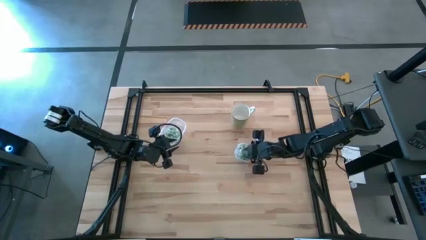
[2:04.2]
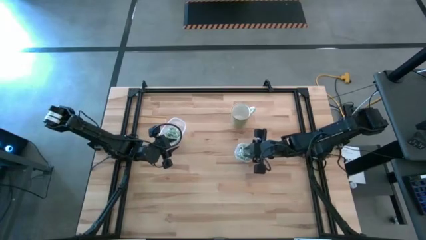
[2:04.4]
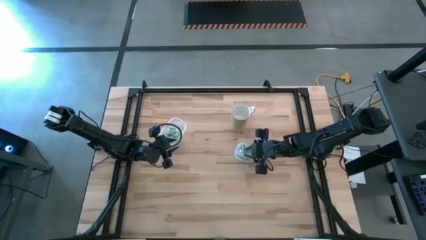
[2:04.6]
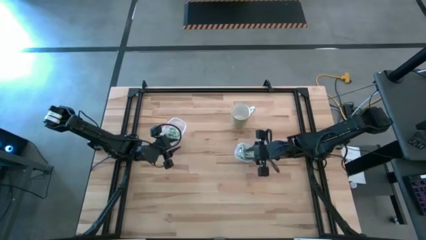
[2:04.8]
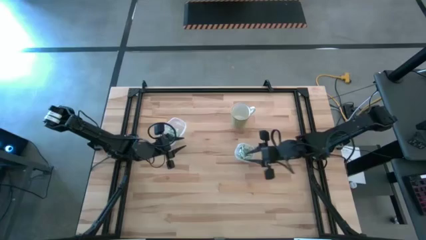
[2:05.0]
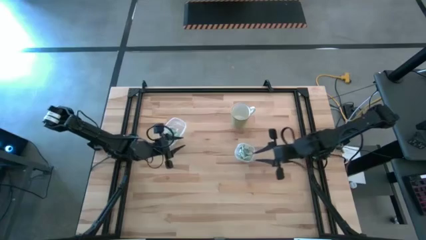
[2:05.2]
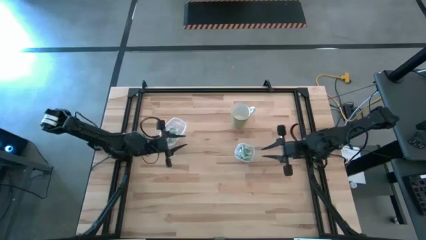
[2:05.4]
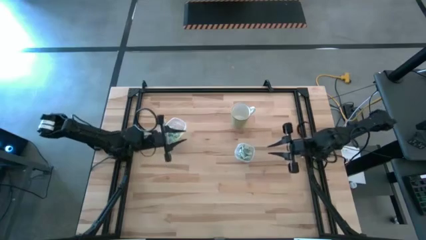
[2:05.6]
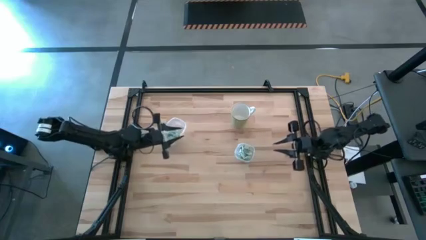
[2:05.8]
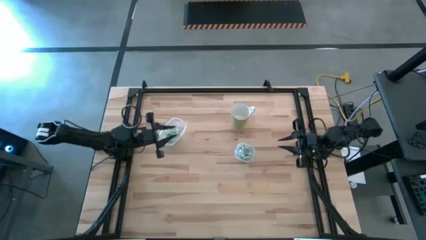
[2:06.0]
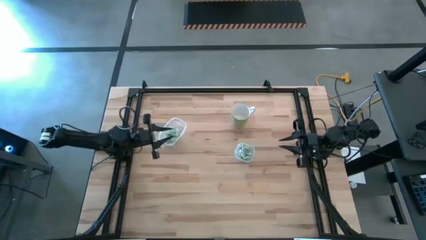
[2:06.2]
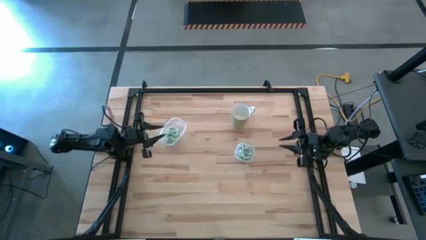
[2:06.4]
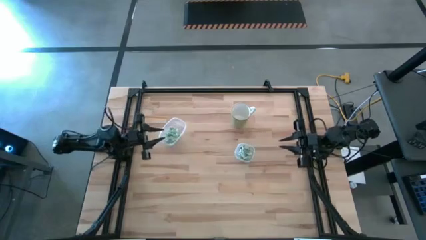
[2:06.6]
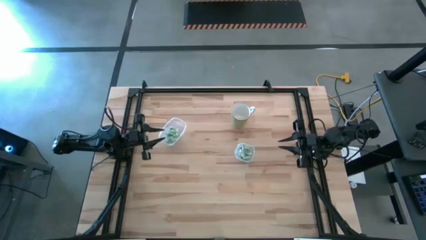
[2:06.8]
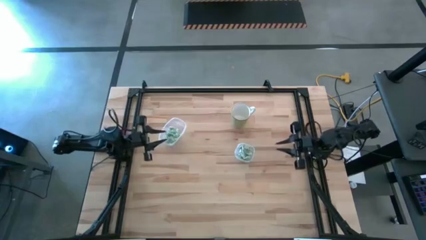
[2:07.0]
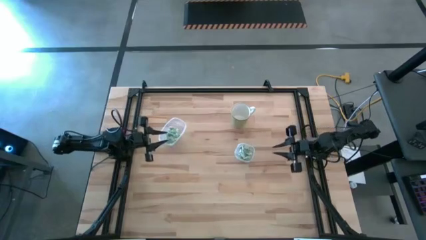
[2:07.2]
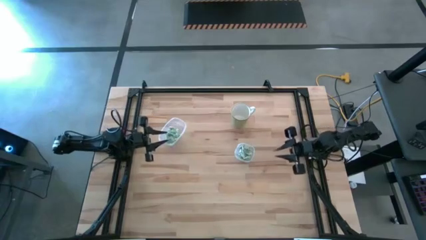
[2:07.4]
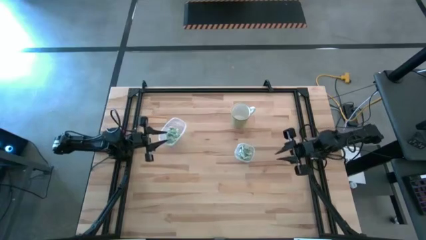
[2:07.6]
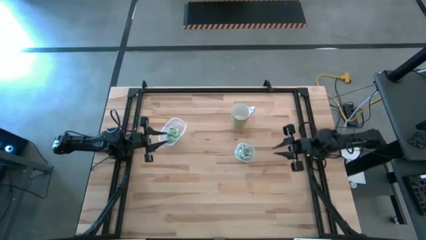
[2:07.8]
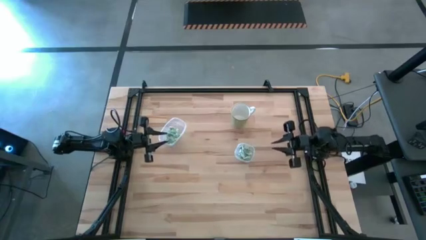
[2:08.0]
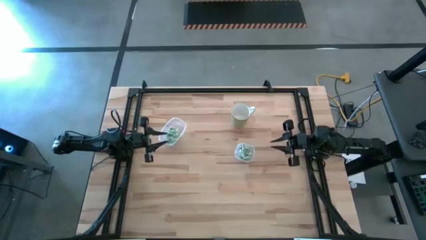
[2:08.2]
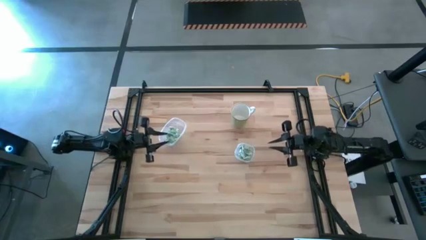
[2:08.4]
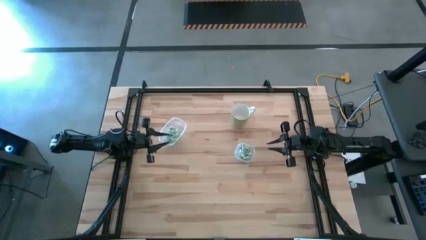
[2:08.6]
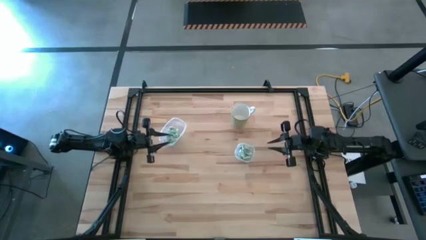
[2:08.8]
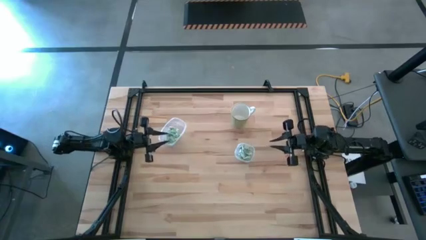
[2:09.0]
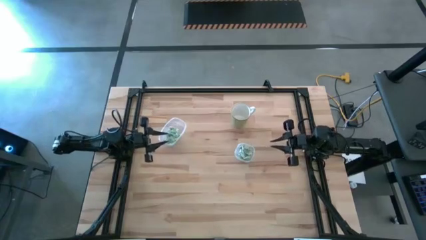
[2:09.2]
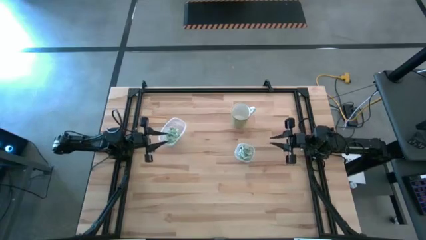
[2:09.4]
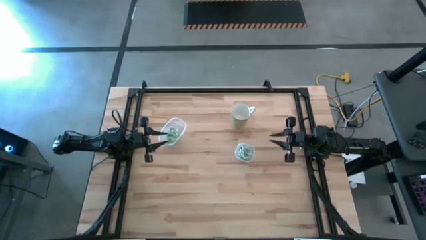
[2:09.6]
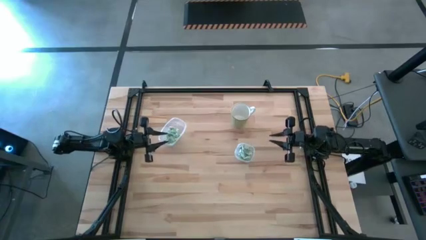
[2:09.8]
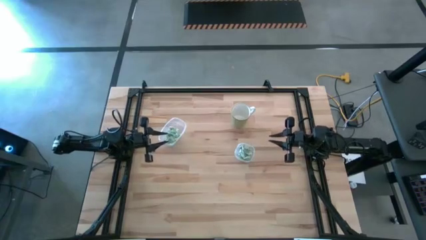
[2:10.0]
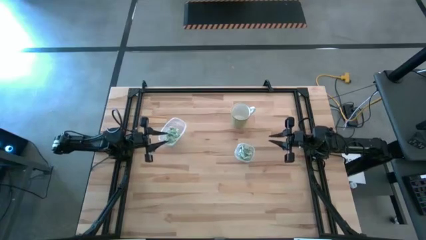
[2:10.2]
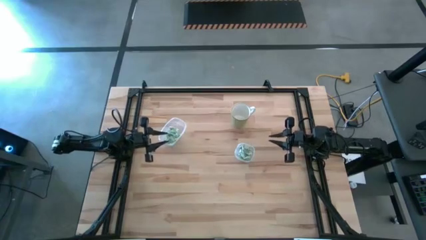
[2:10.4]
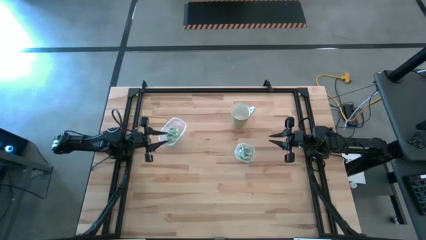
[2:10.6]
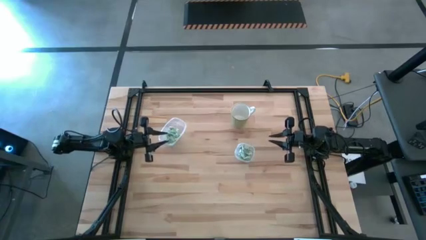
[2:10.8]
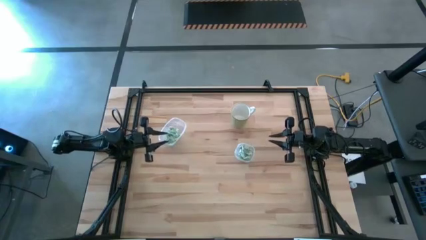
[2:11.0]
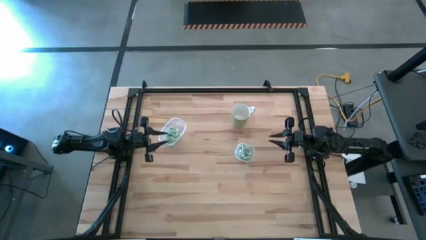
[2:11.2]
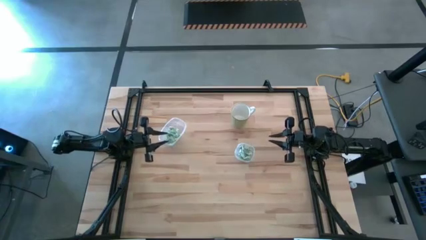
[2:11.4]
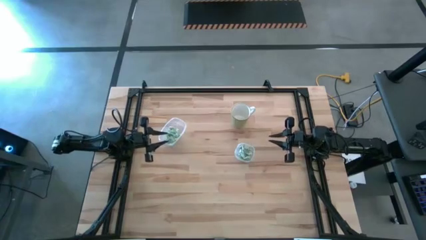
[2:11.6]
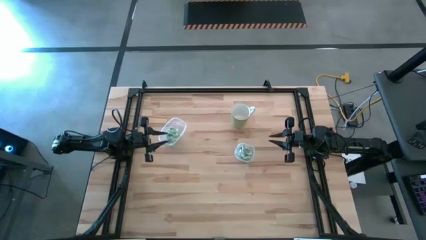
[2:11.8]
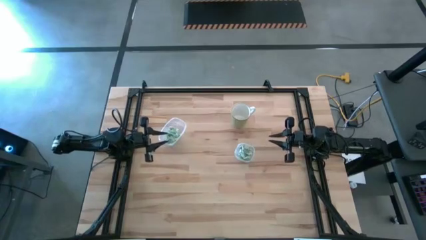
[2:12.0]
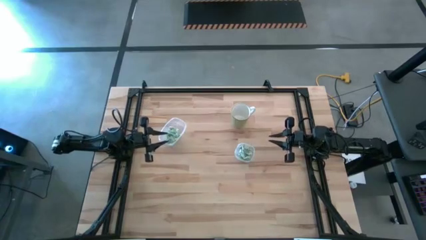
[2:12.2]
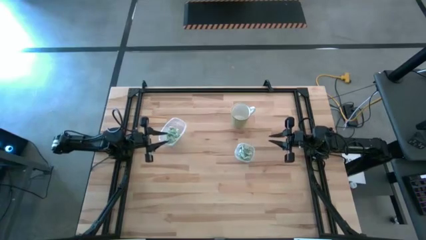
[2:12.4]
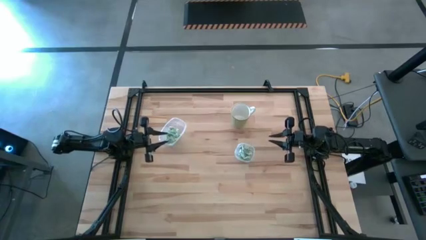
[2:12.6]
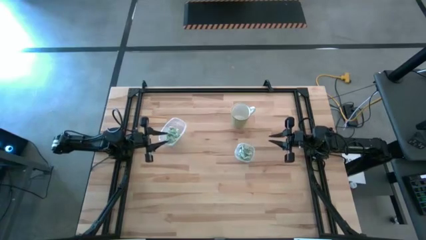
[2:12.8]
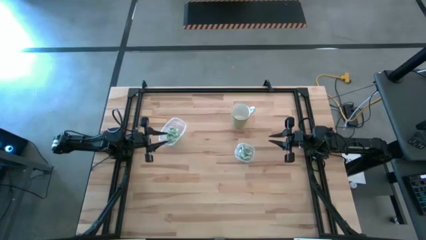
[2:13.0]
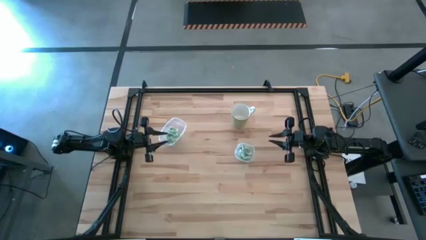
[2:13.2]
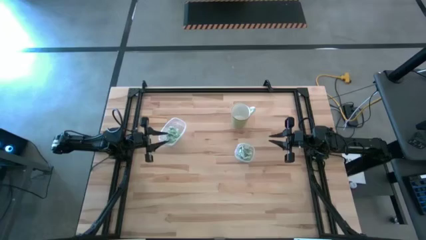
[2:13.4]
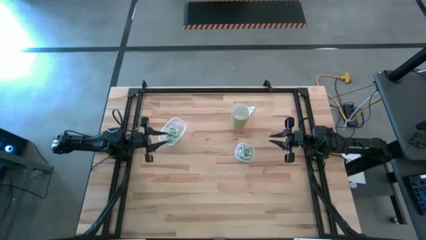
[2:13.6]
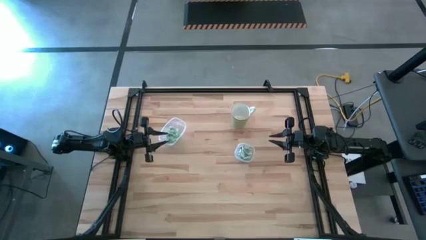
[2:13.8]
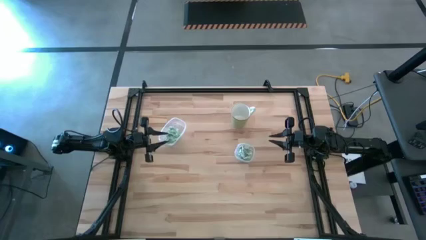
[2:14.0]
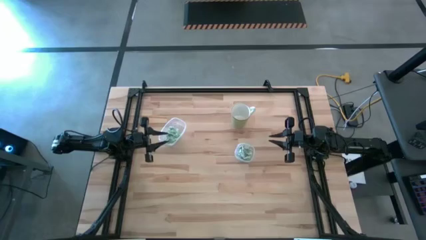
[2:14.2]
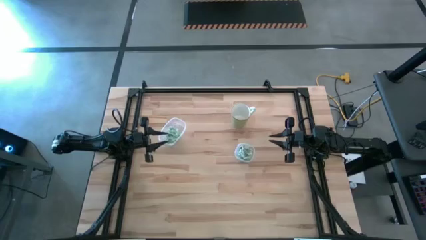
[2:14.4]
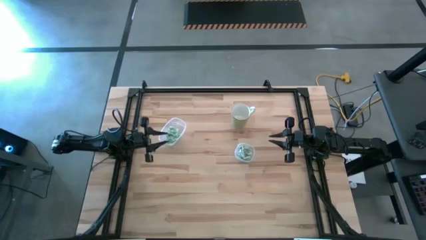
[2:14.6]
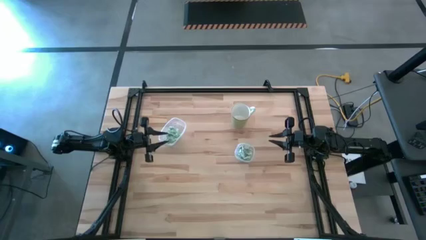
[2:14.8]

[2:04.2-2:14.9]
Task: Pick and place Stevia / Truvia into bins
Return to Home Position

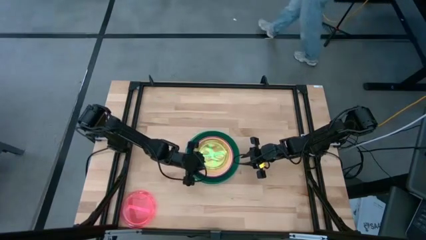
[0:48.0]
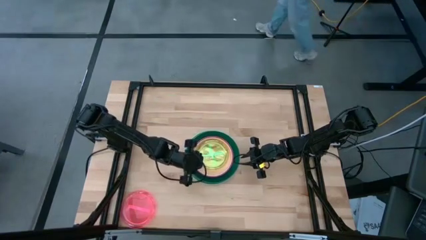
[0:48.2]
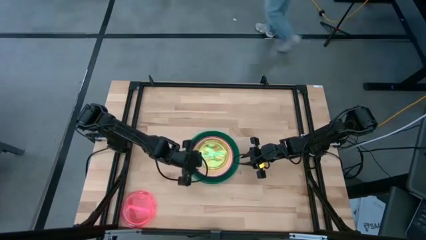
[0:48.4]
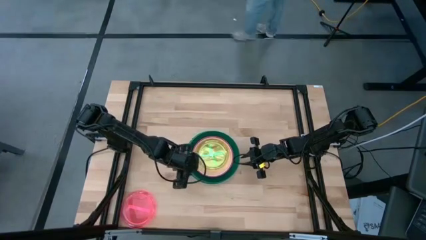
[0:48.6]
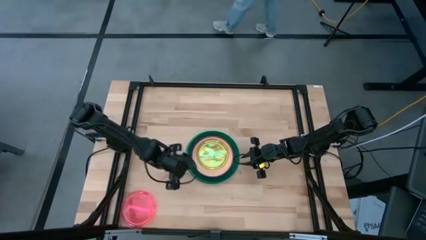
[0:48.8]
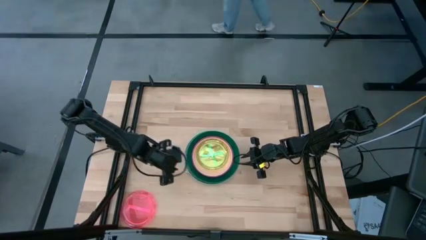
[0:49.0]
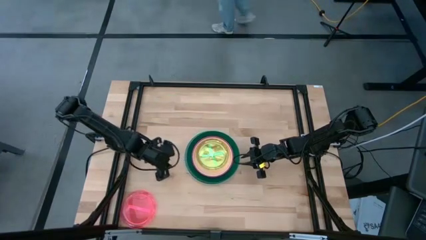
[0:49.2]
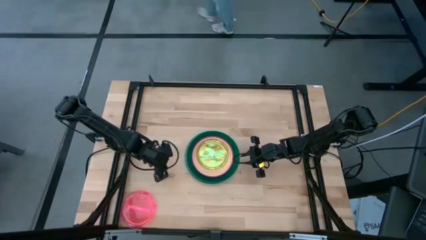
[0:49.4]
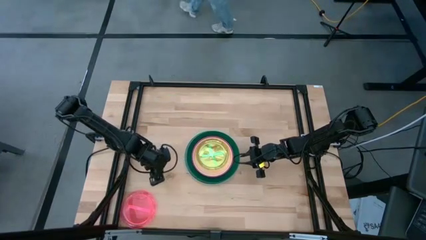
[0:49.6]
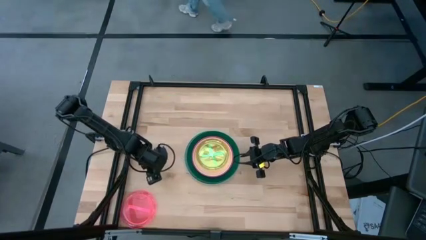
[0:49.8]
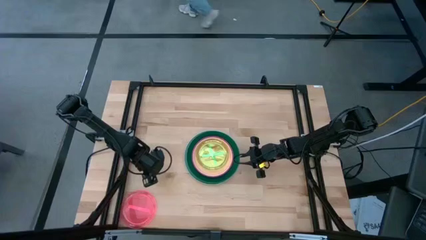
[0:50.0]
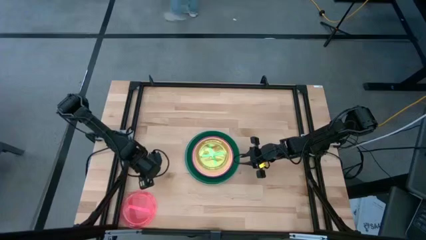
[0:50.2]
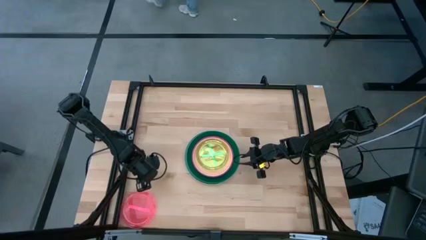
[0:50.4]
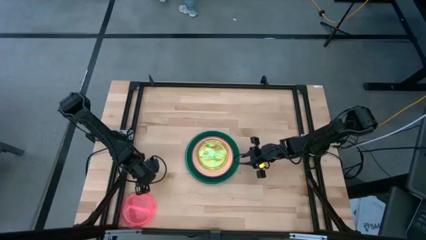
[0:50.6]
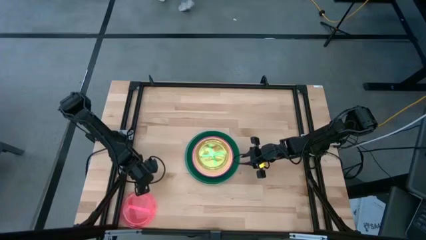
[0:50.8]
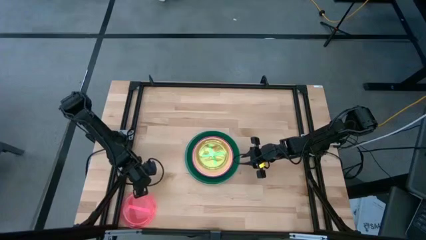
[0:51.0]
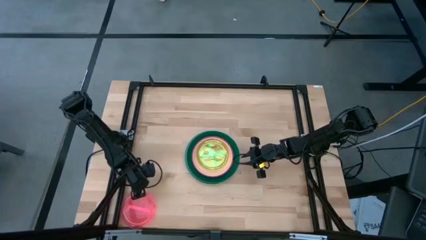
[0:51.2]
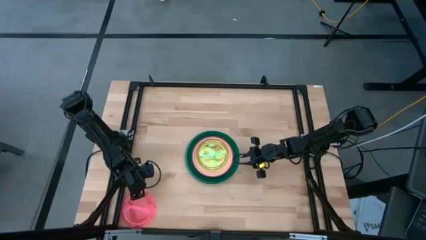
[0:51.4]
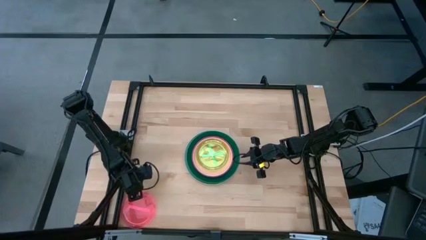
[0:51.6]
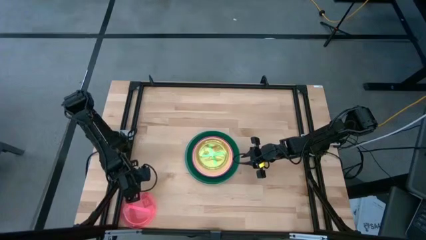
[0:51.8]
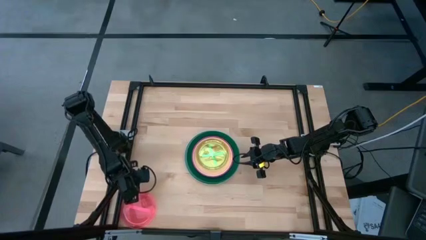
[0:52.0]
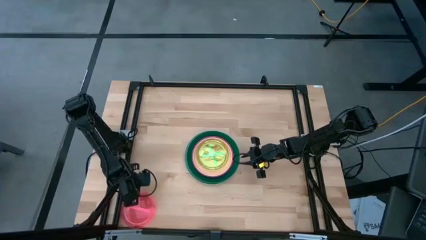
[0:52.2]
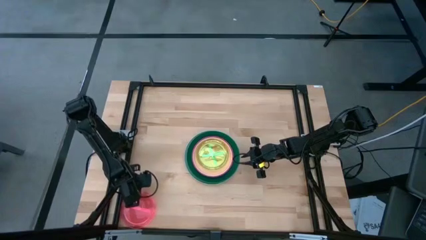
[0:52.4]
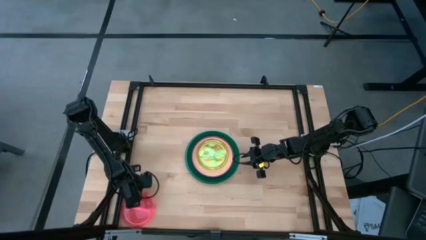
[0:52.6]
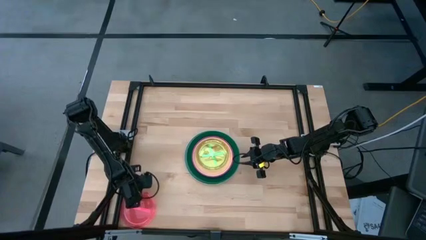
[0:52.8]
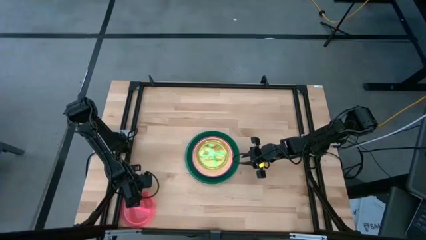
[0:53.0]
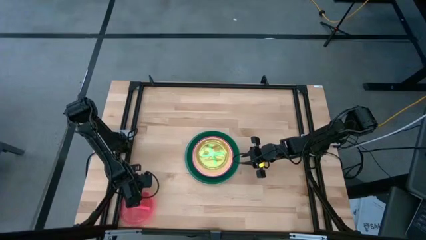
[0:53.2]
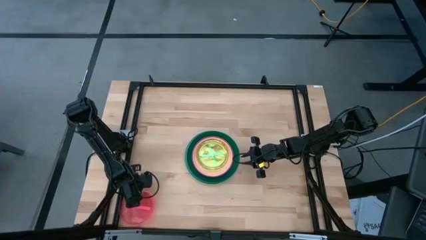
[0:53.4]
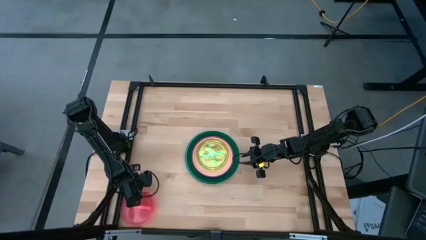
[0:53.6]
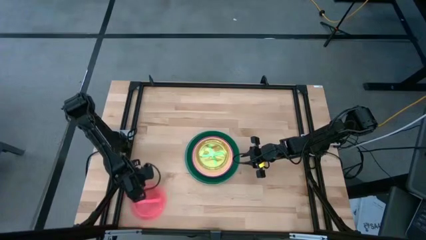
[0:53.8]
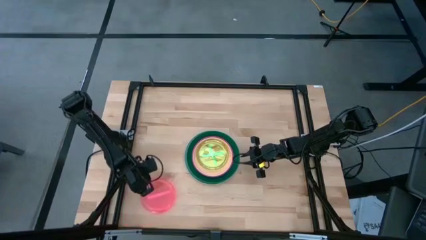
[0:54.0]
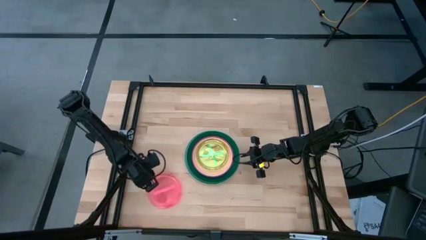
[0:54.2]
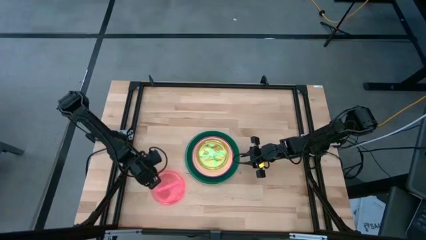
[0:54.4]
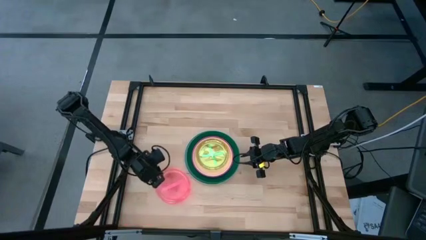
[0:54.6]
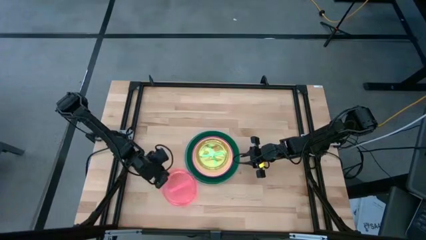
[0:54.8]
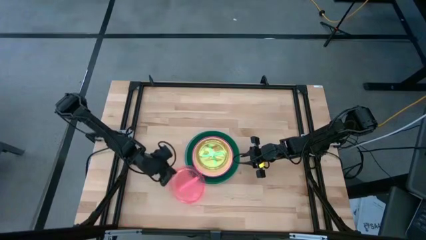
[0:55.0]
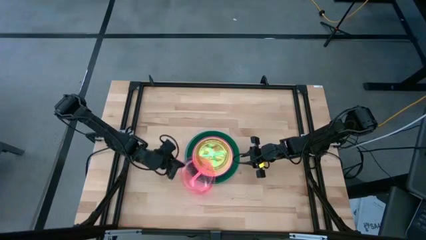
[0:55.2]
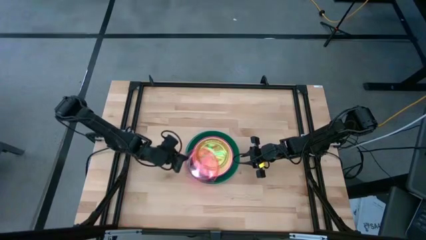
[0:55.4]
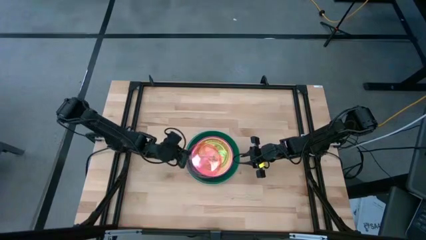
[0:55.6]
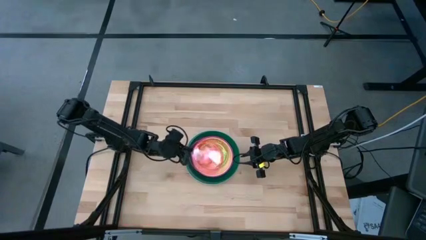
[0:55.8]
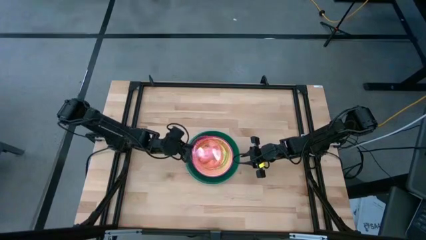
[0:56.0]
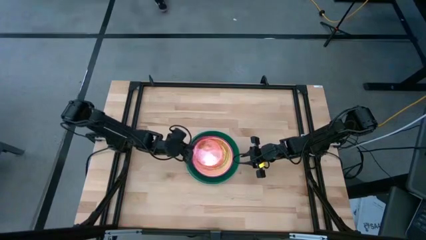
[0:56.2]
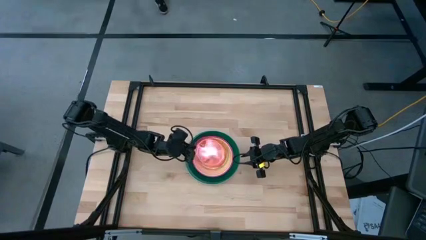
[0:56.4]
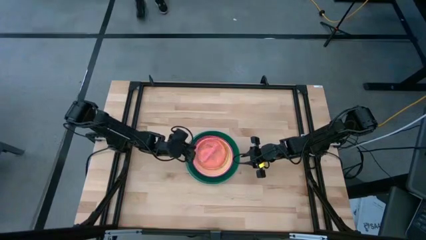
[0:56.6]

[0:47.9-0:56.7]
Task: Stack plastic plates
Stack the light pink plate on top of the light green plate
